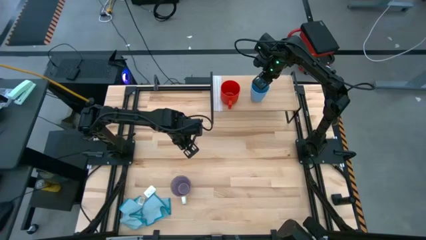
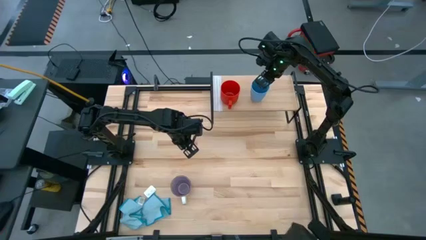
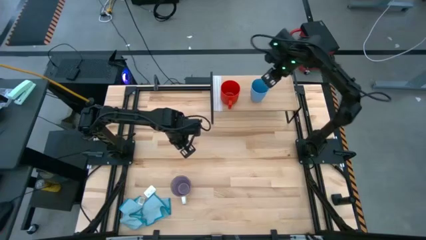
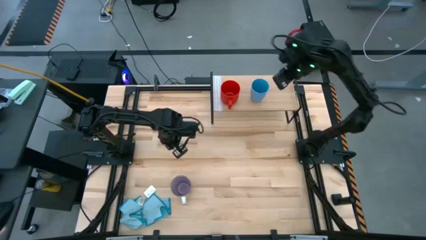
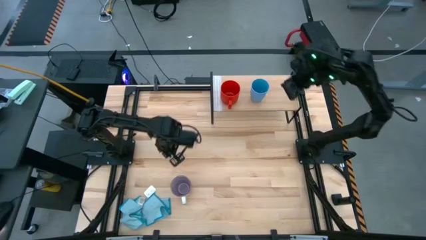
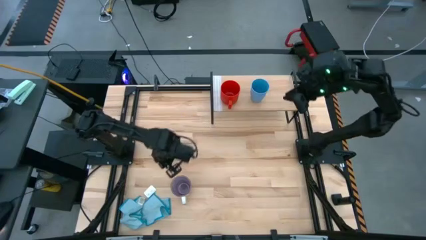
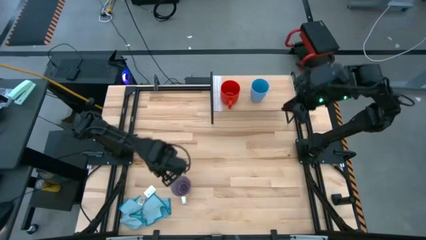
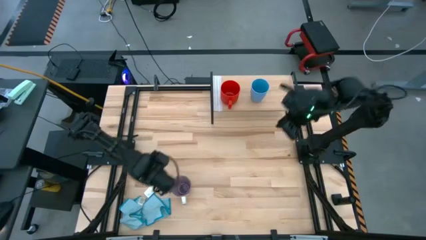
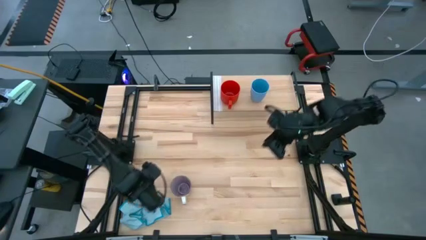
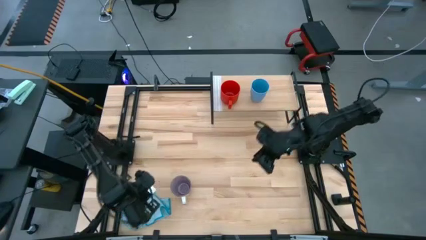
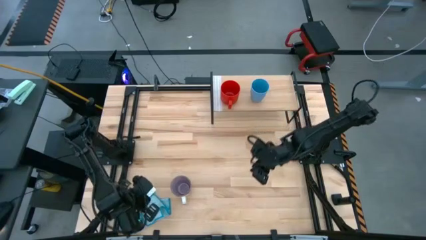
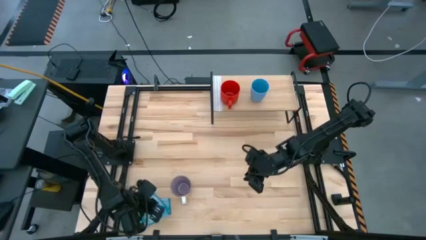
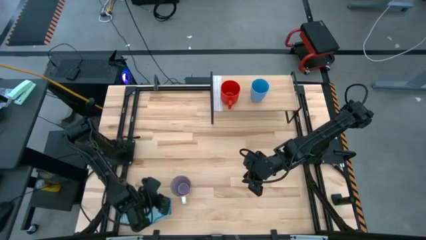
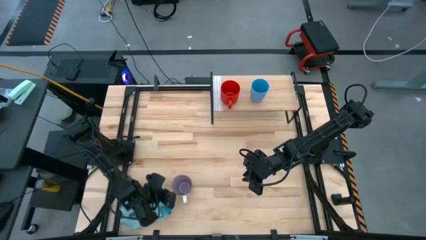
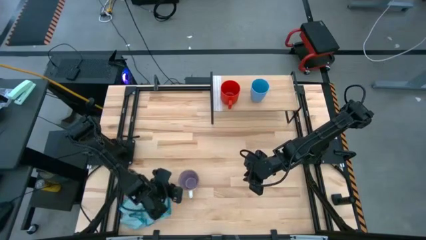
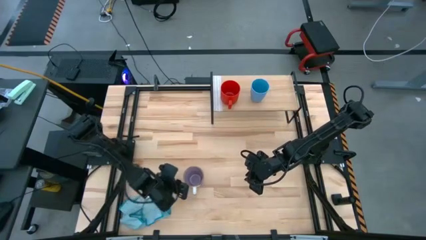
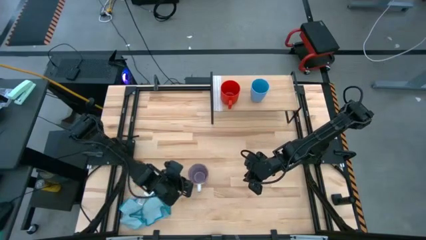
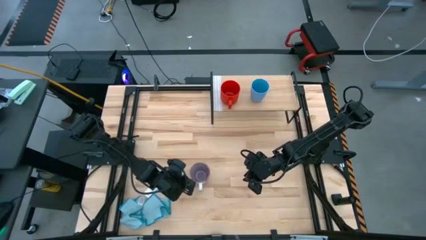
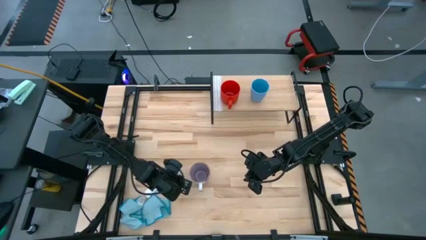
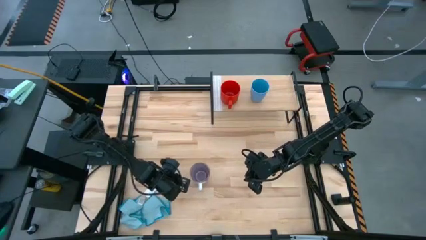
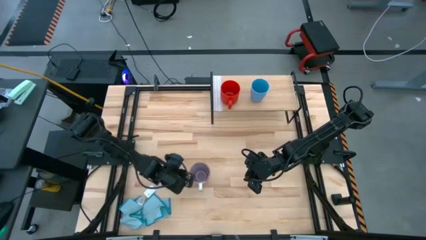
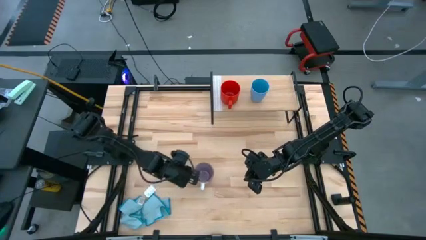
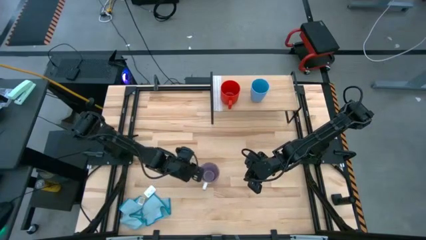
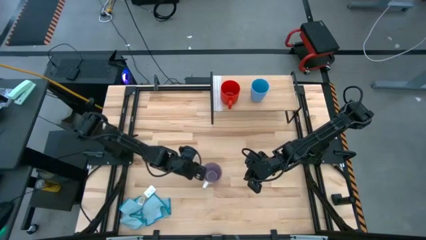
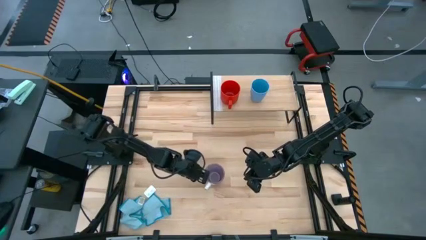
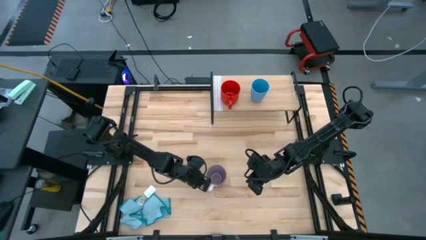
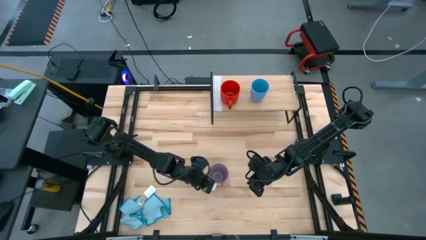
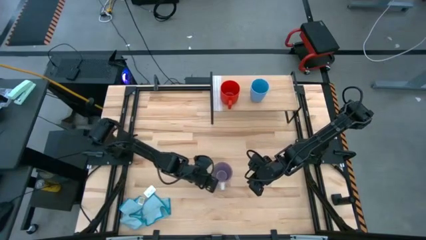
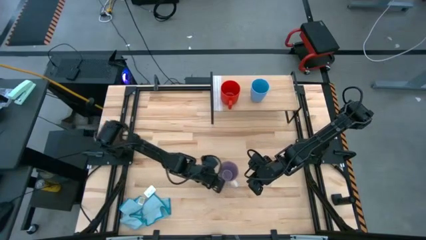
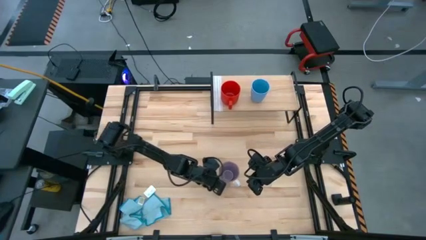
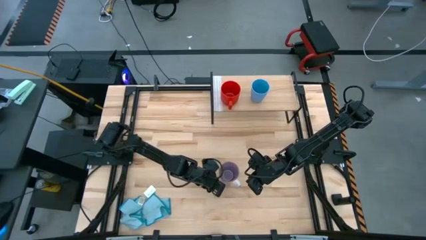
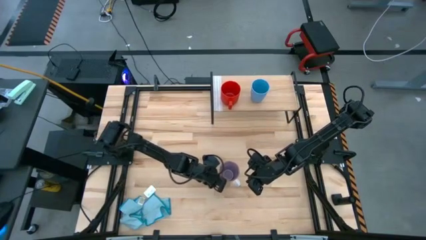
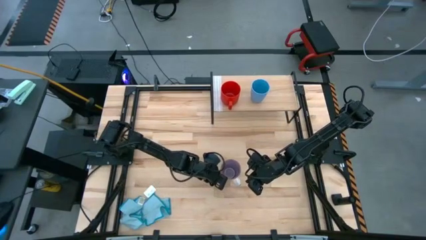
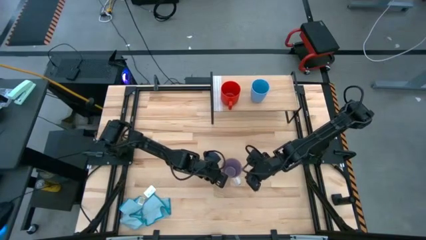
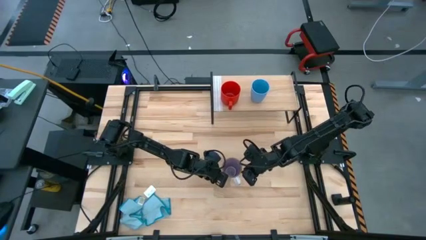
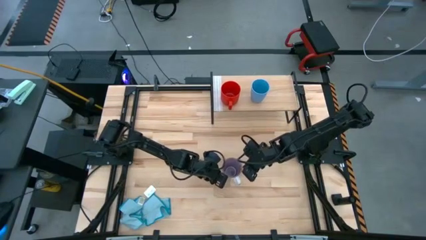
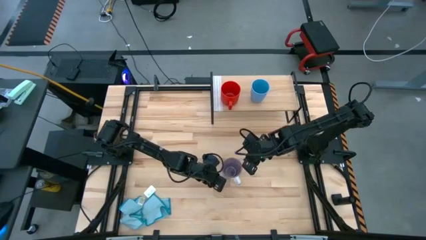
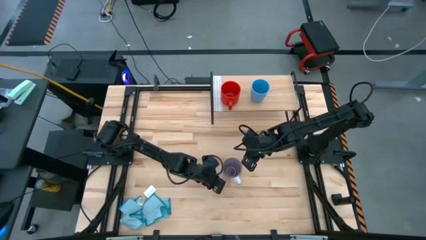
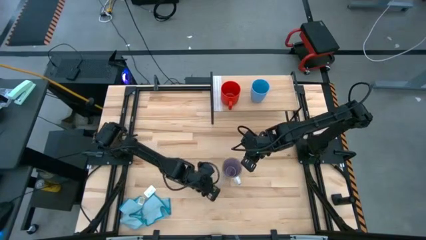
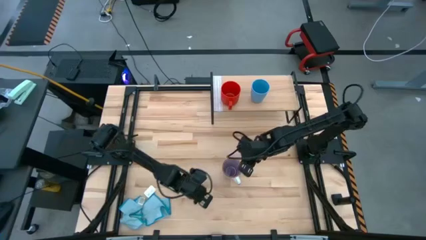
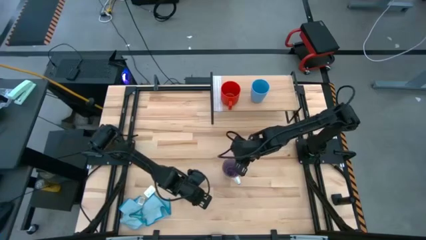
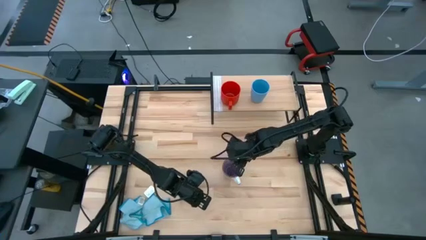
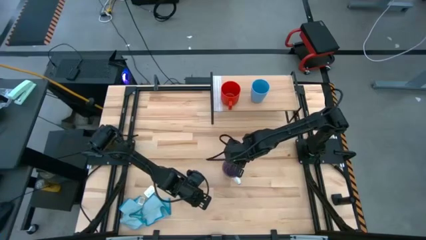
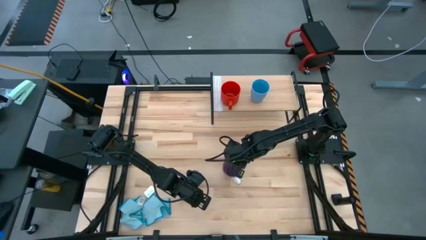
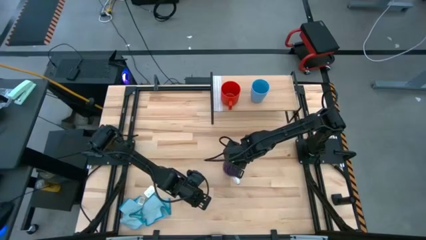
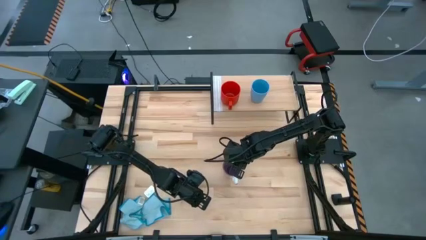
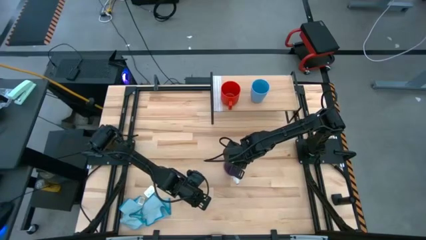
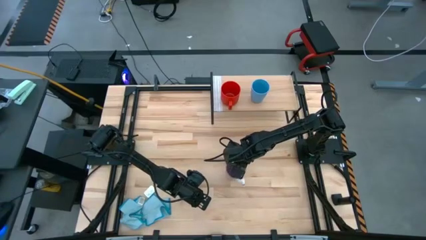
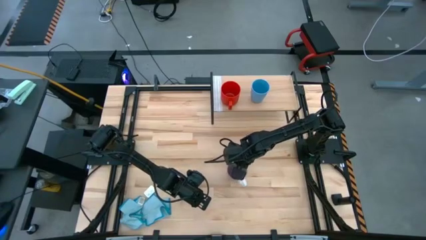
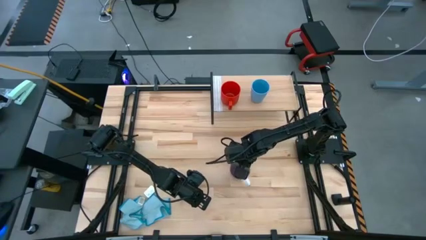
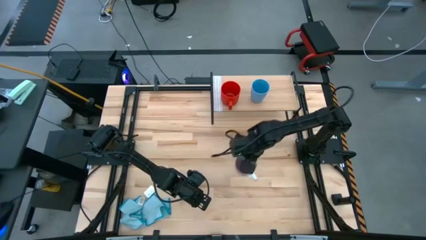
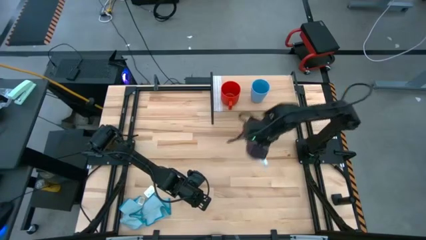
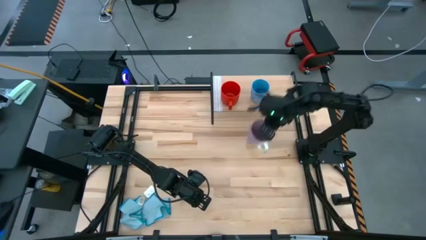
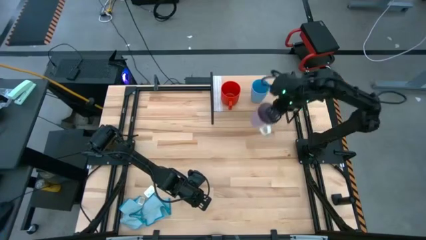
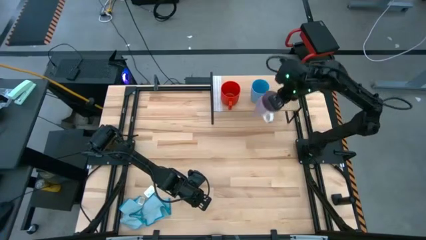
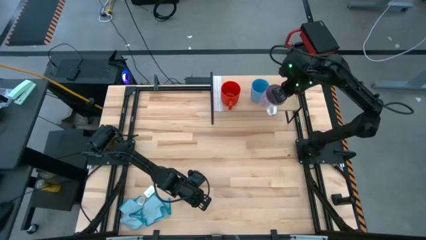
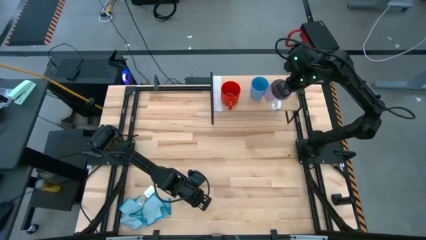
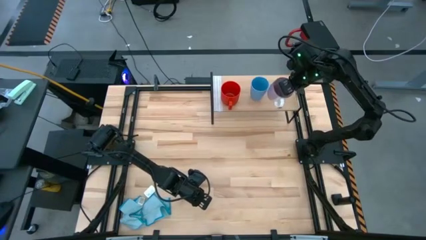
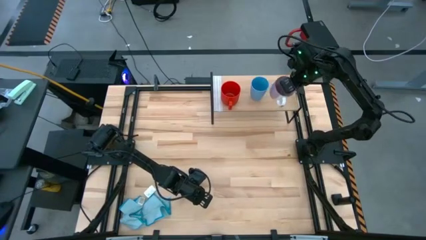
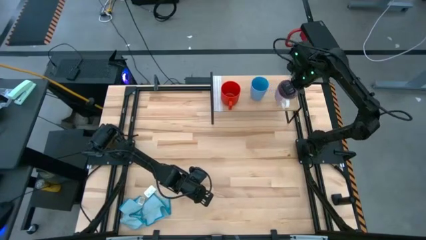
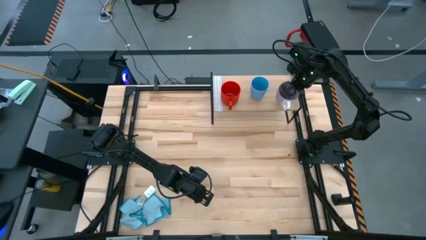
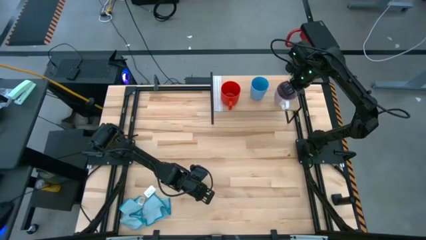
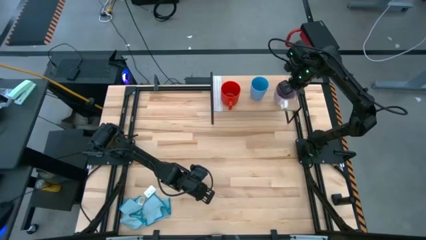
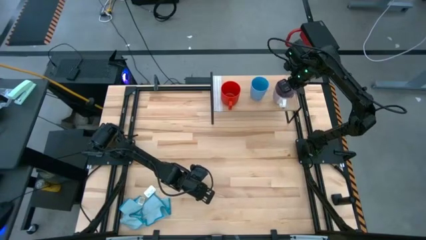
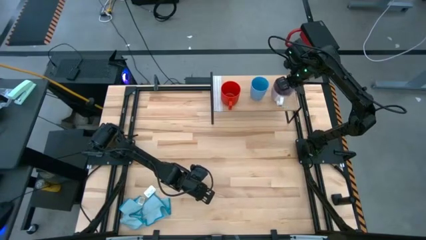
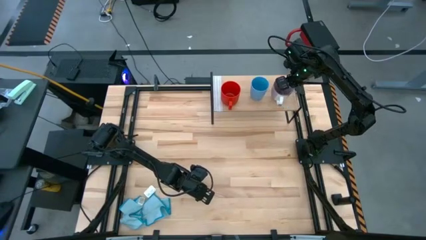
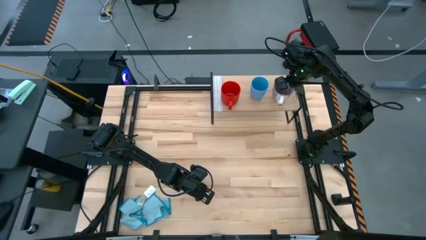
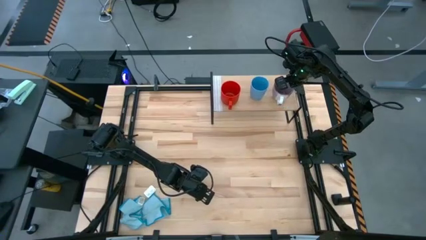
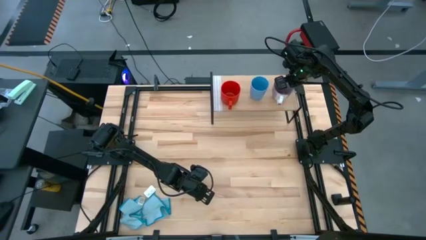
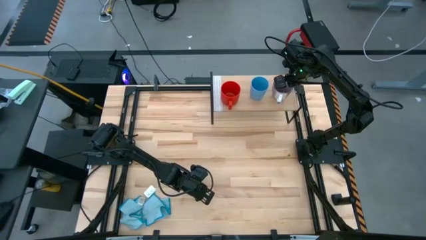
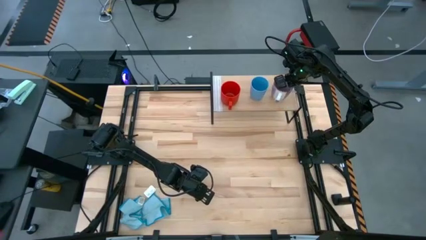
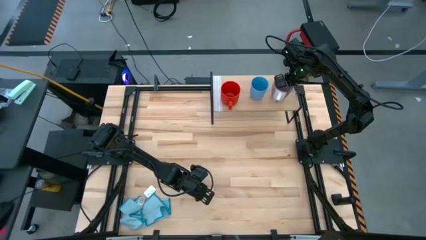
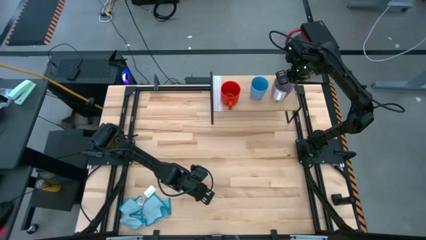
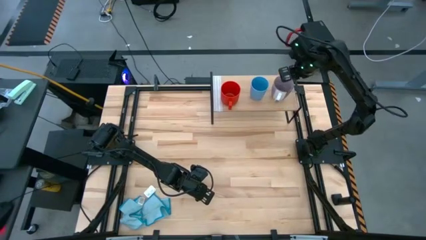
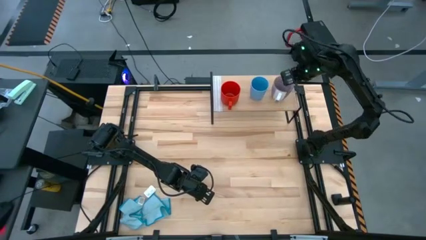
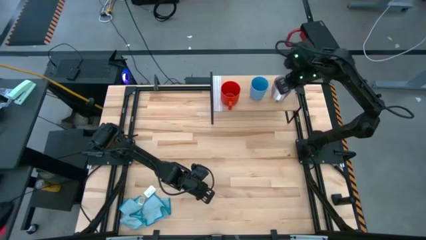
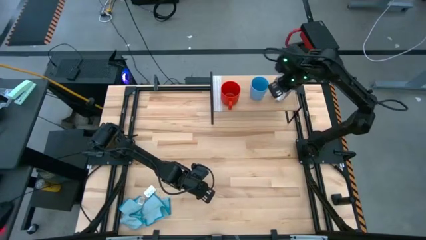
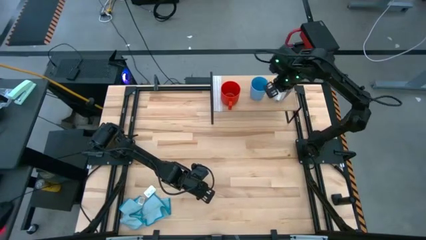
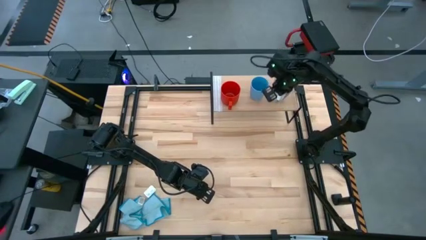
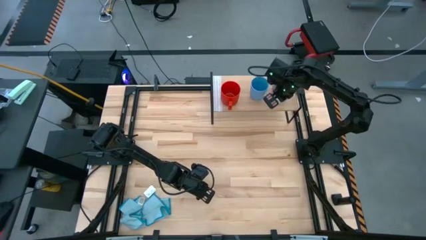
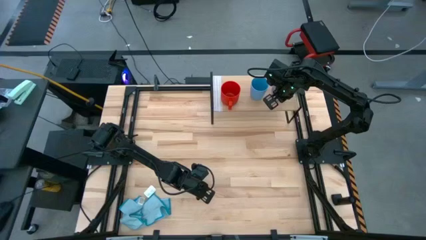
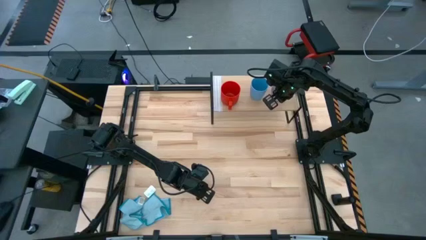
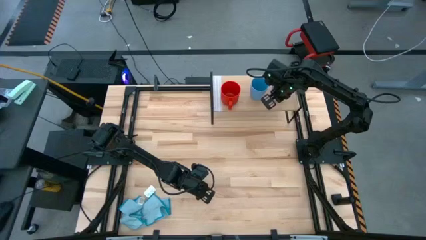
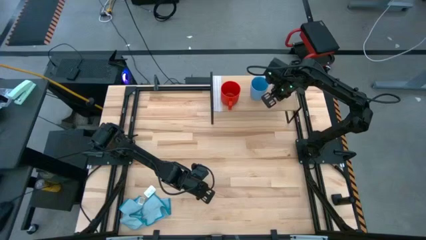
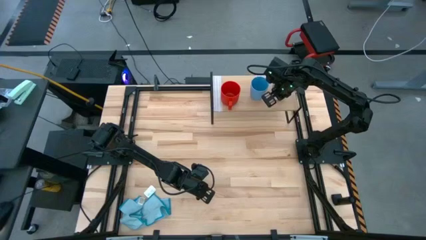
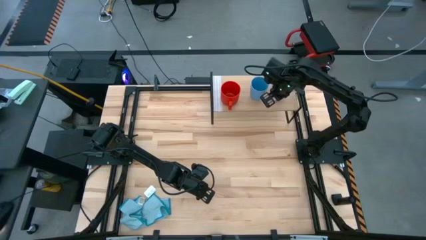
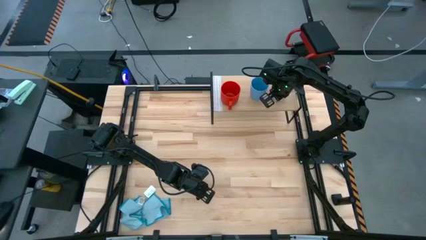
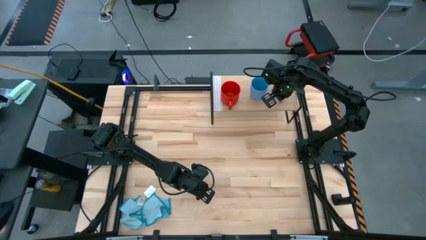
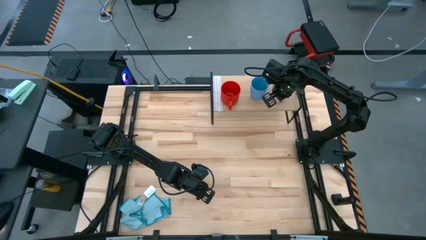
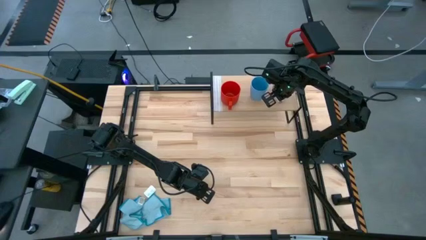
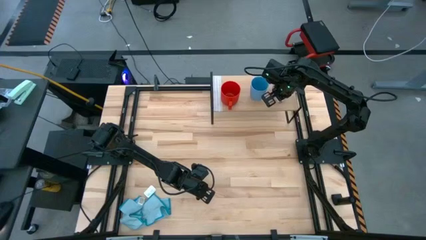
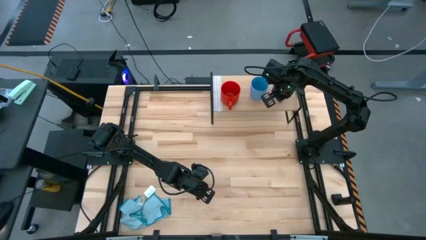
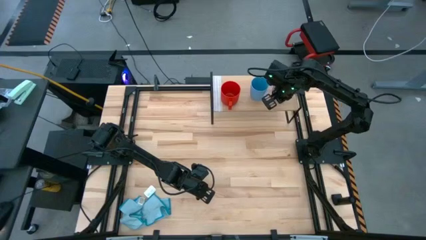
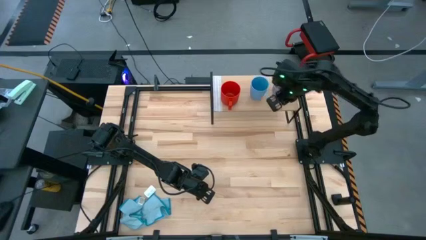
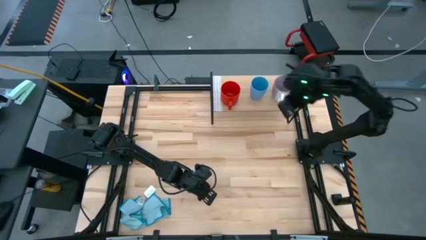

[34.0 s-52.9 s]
Task: Stack small to large cups/mugs on shelf
Put the purple mug on the shelf
